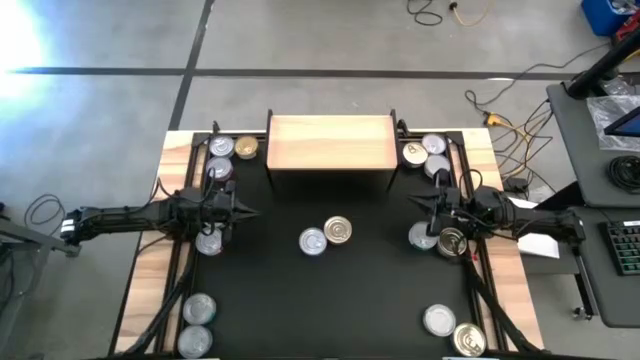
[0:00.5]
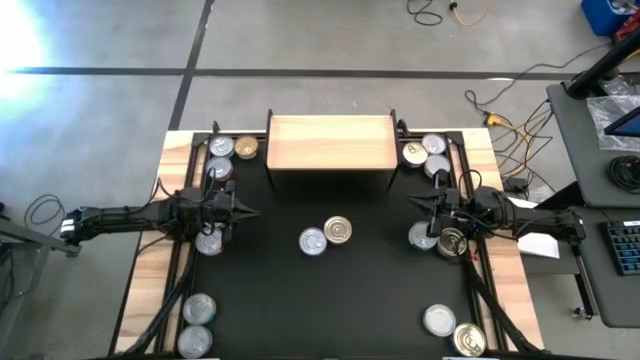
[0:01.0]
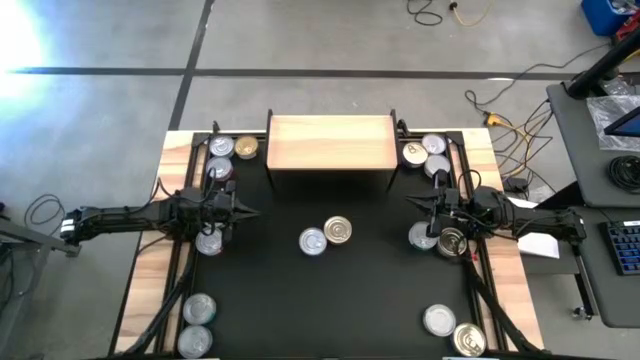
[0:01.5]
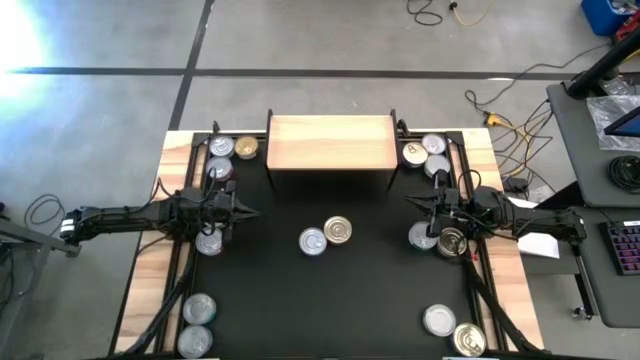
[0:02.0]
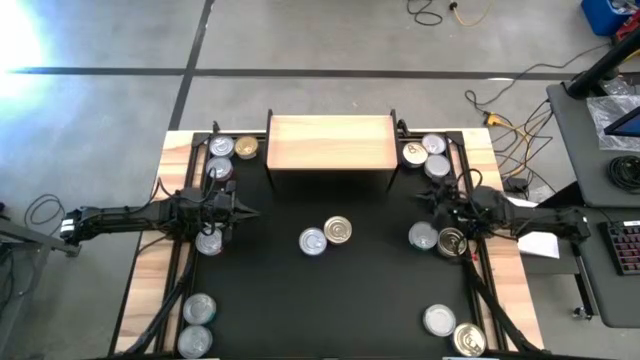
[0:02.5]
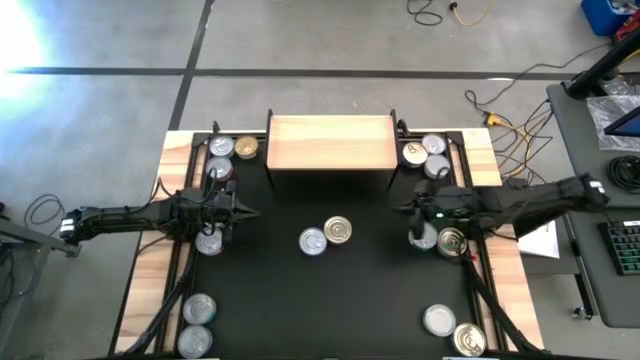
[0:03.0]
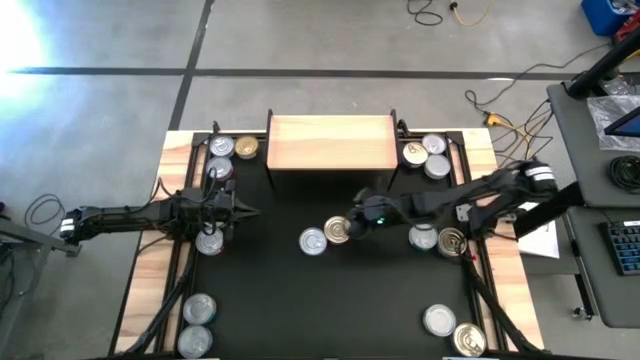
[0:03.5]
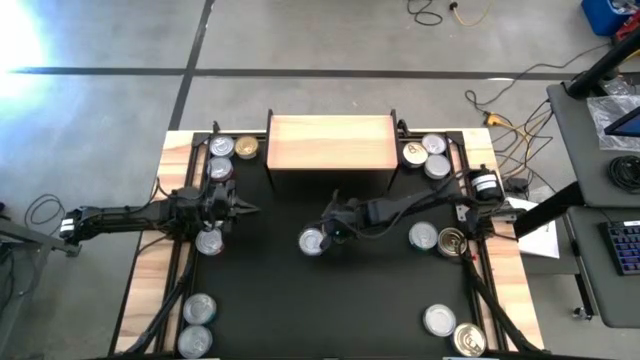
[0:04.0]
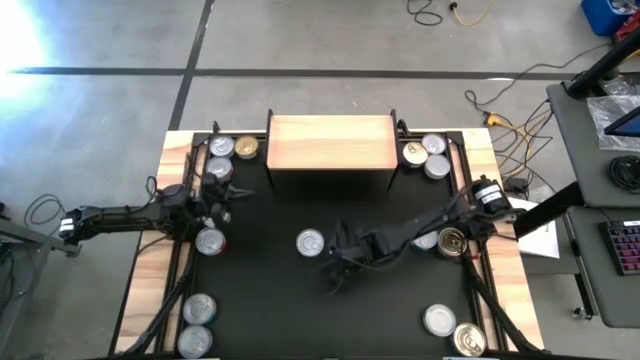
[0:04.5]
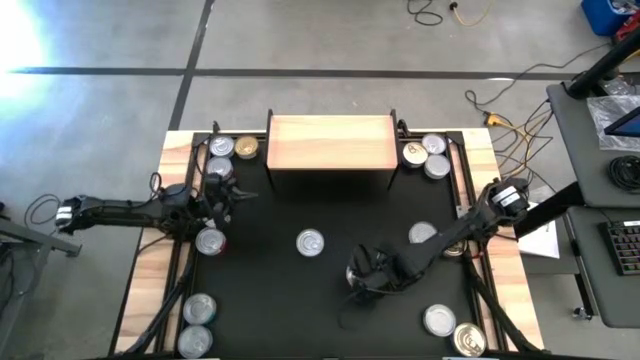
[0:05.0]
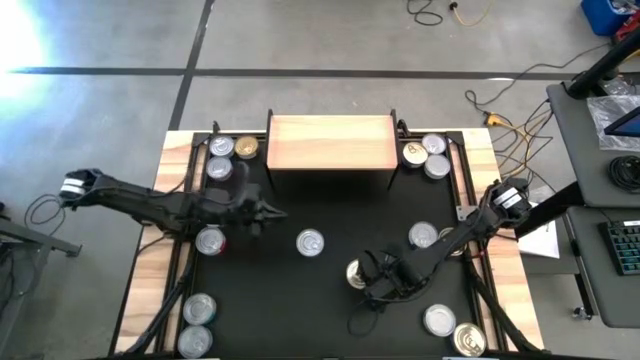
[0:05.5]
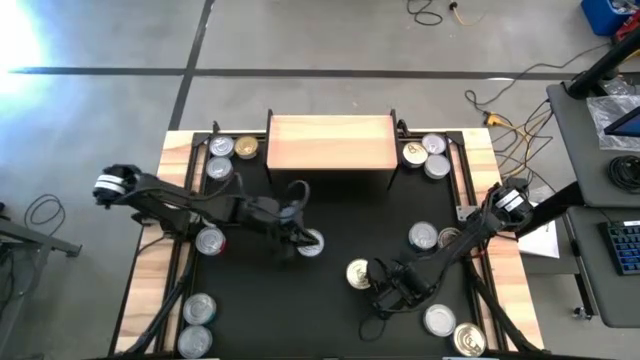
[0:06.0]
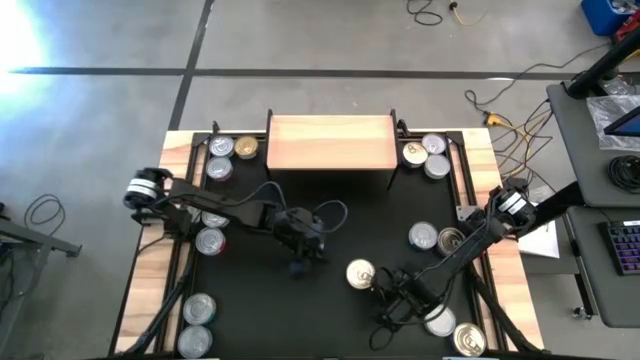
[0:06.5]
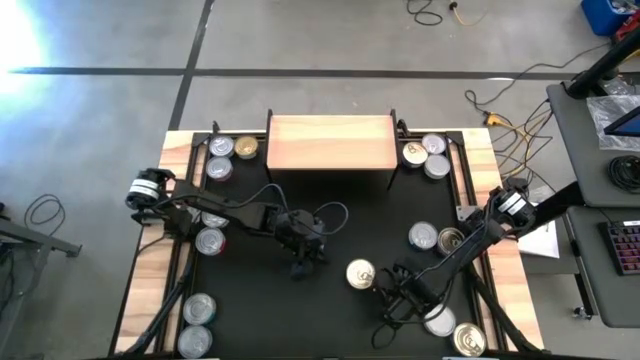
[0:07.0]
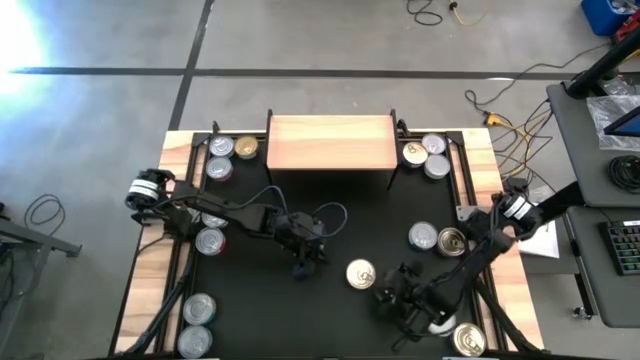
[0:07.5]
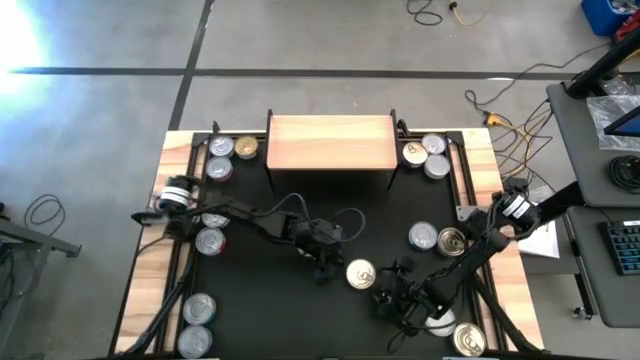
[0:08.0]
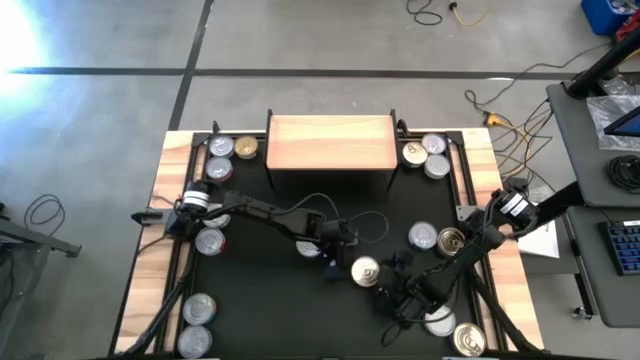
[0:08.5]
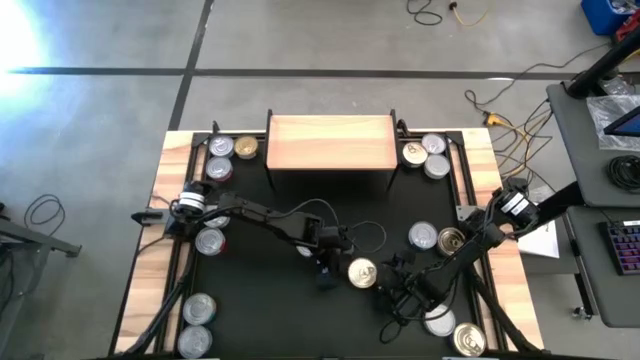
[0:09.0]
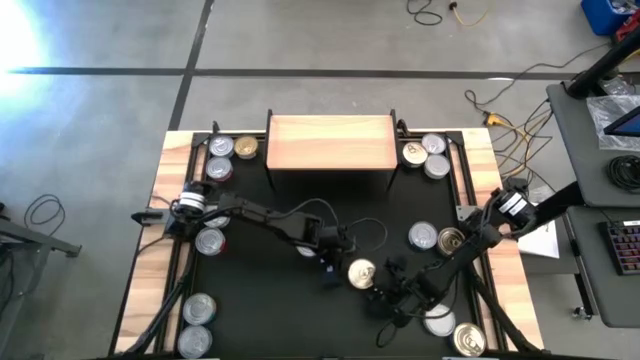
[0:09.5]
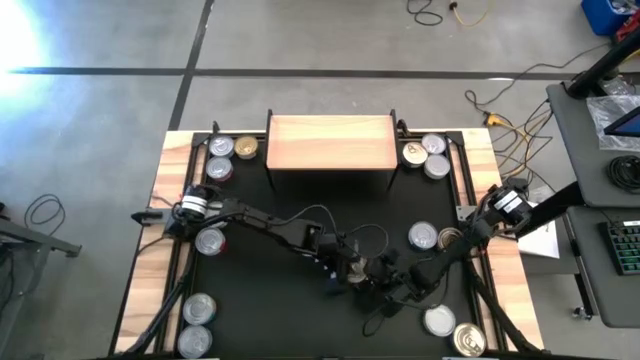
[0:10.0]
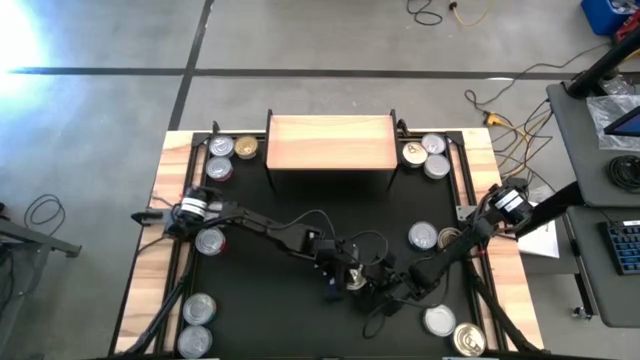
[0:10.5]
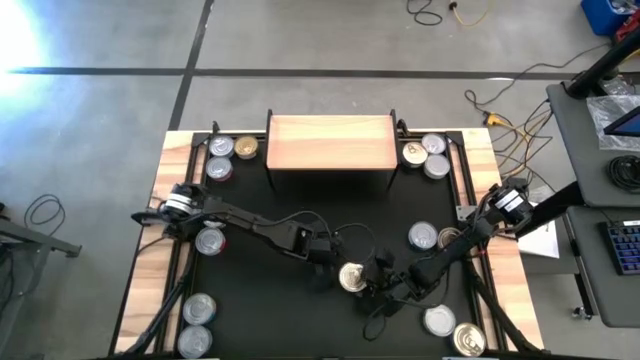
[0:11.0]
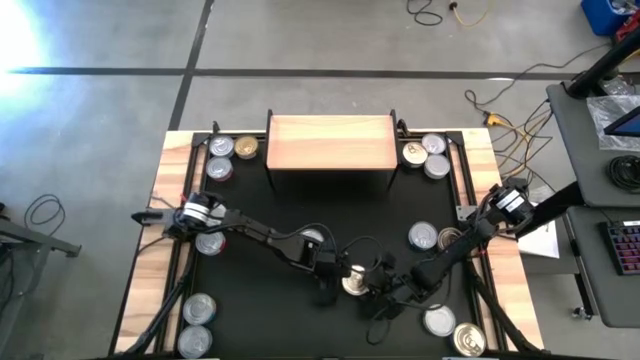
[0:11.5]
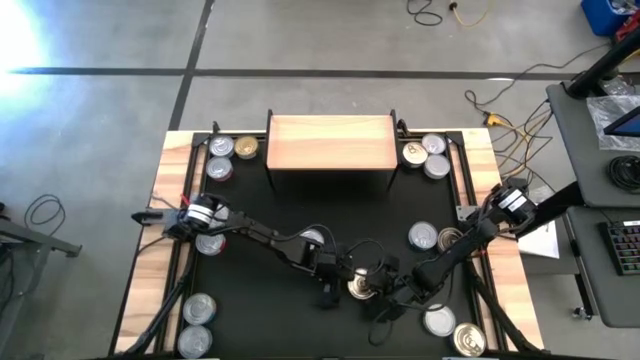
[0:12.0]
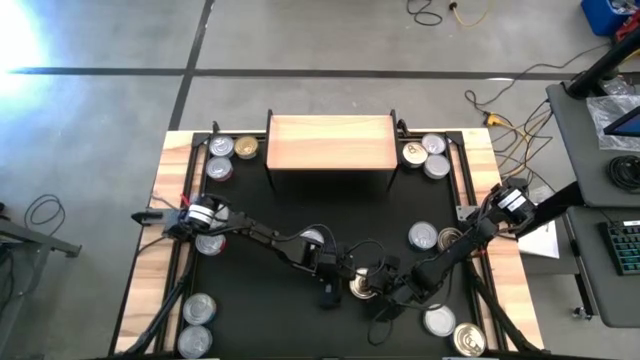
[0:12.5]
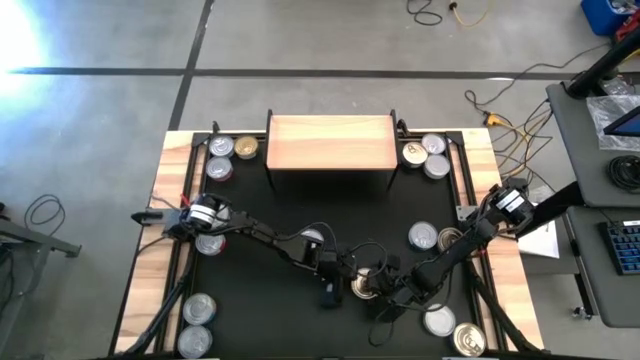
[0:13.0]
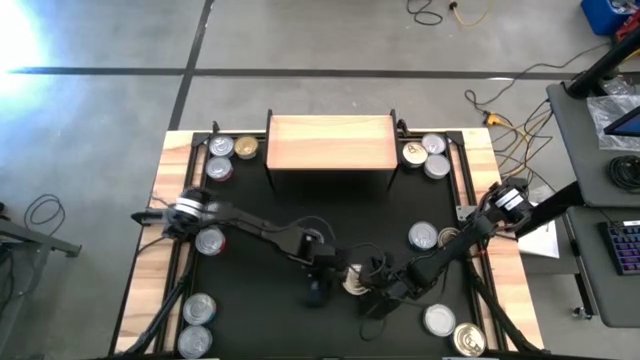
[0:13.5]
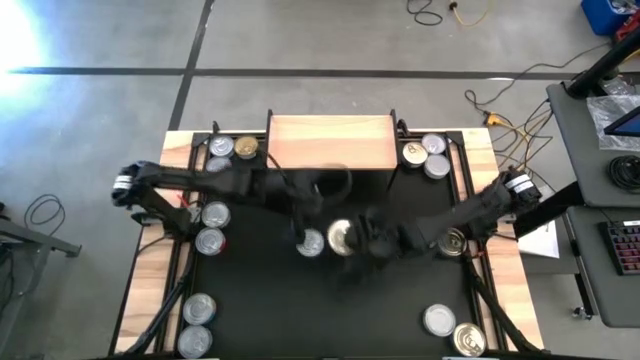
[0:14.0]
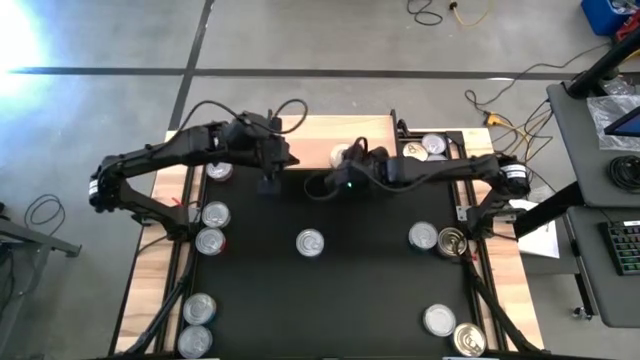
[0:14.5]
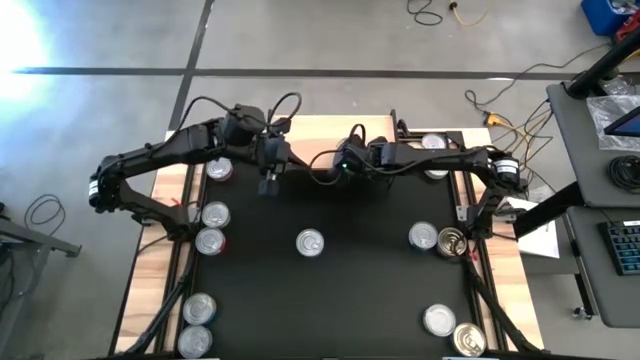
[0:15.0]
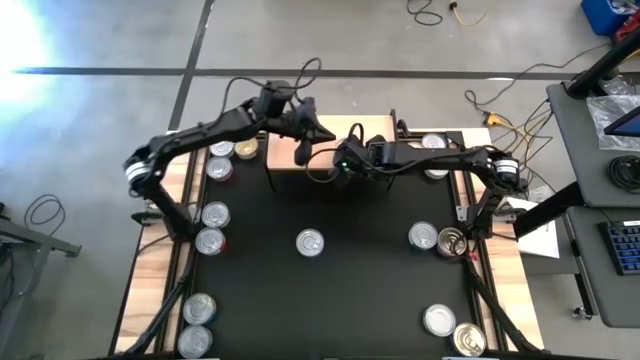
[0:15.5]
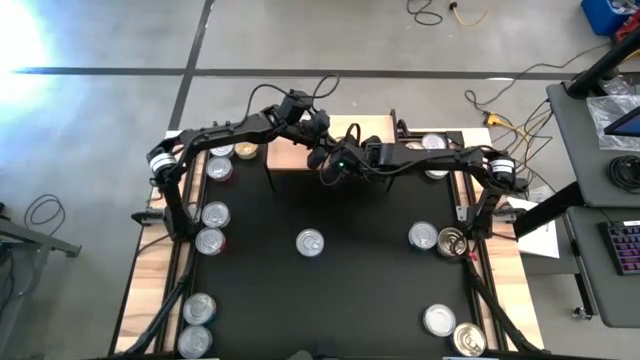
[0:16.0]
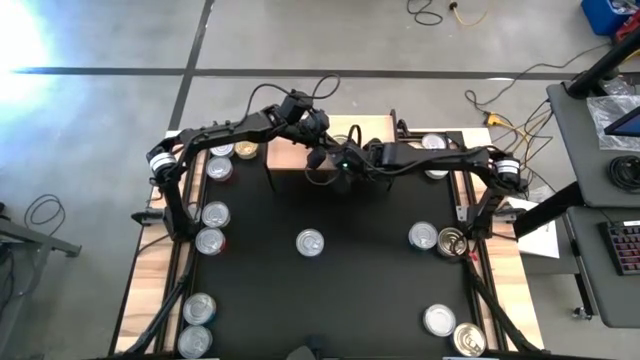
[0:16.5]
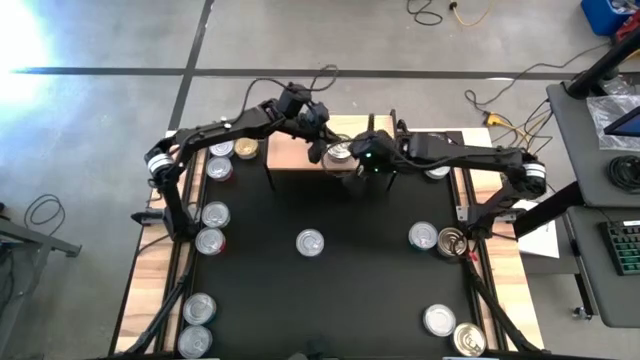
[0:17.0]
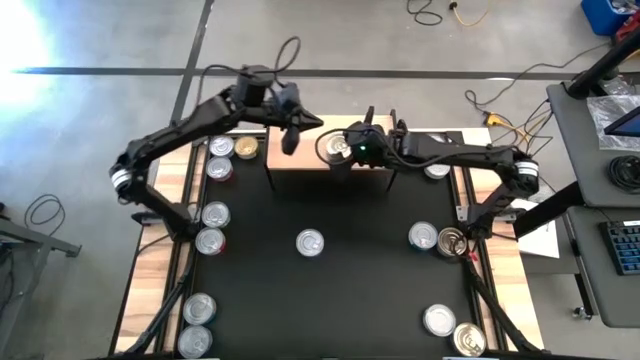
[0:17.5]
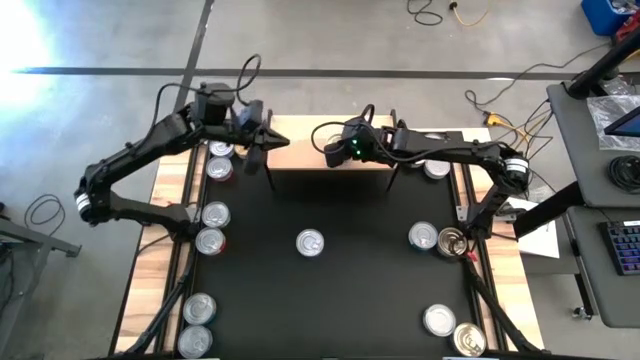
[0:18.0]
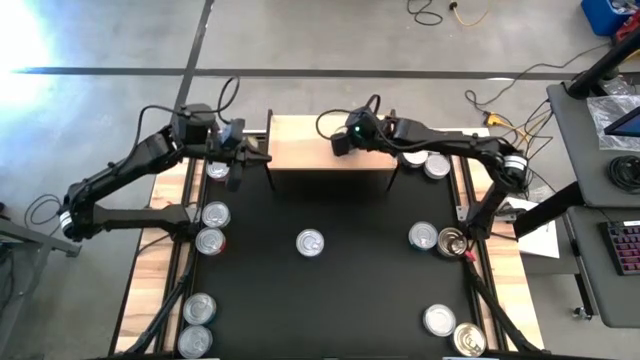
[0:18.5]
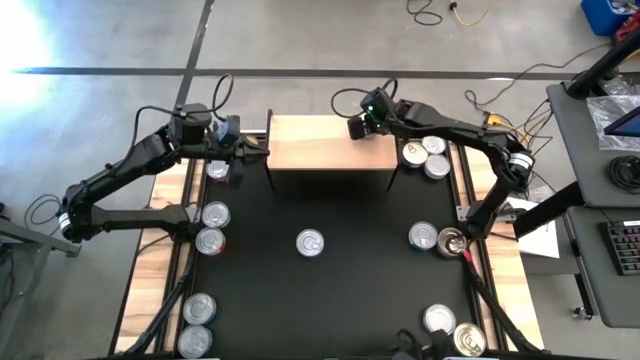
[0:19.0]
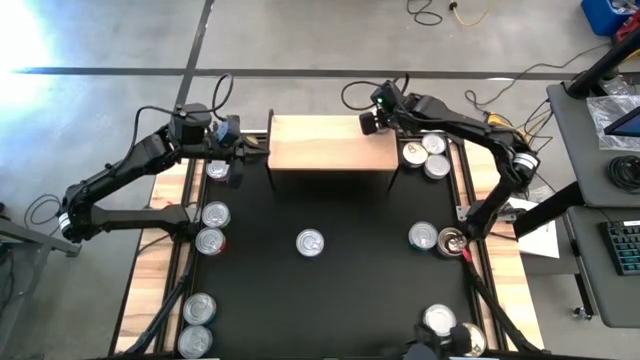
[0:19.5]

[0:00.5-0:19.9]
Task: Stack canned seafood by type on shelf
Put the middle left blue-pink tuna can on the shelf
